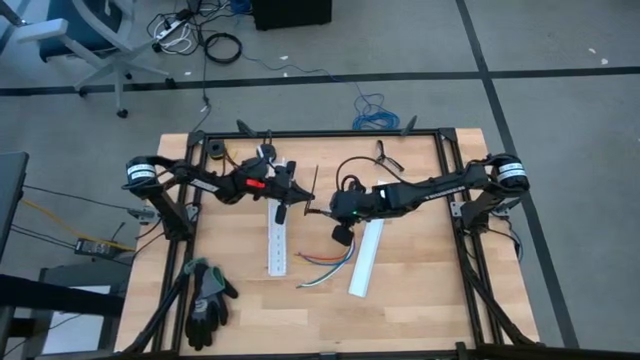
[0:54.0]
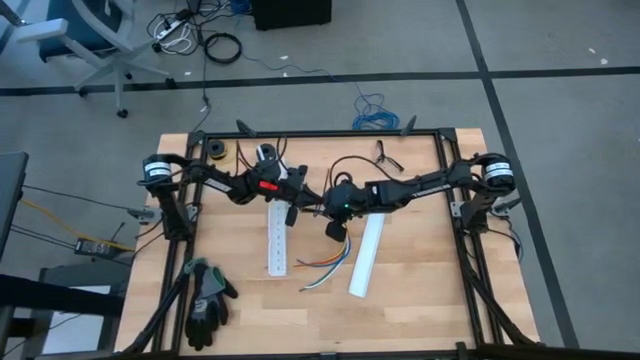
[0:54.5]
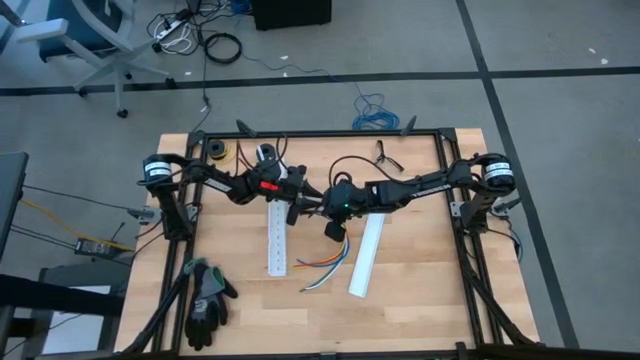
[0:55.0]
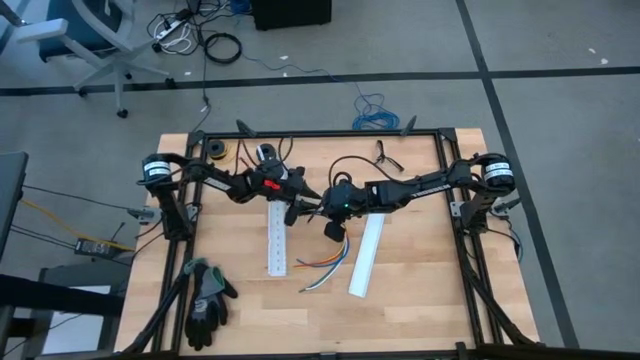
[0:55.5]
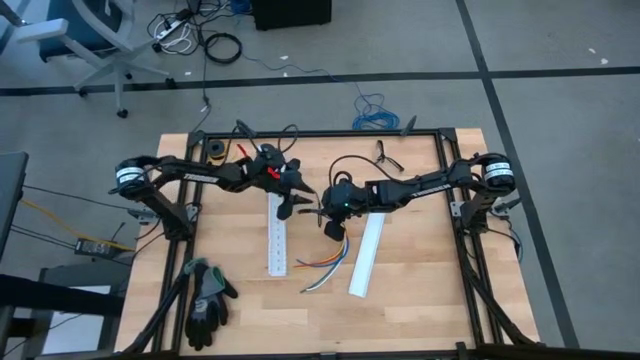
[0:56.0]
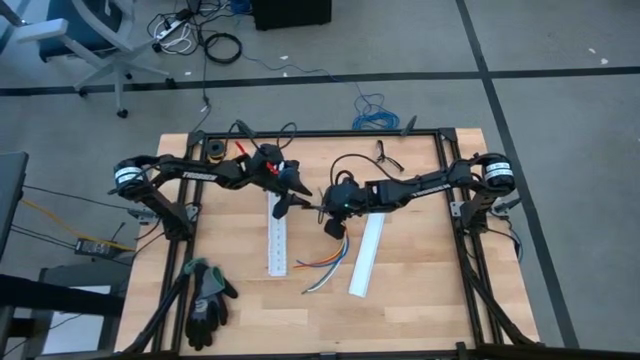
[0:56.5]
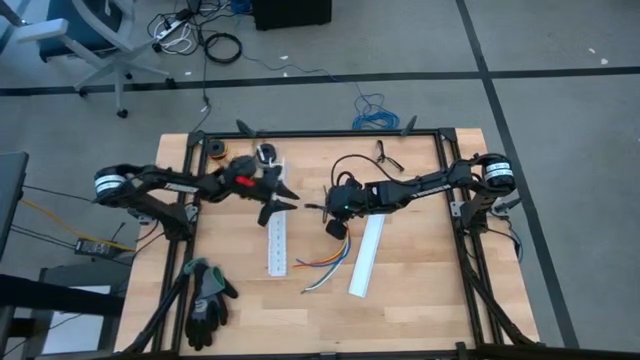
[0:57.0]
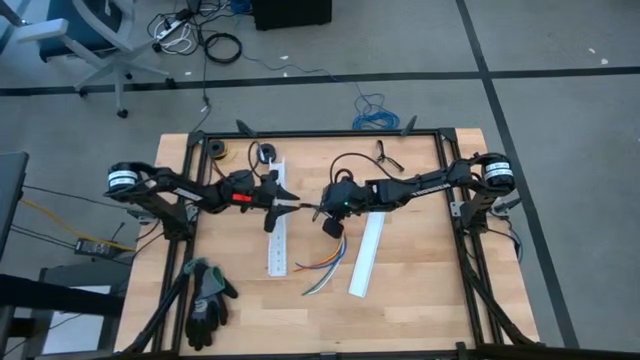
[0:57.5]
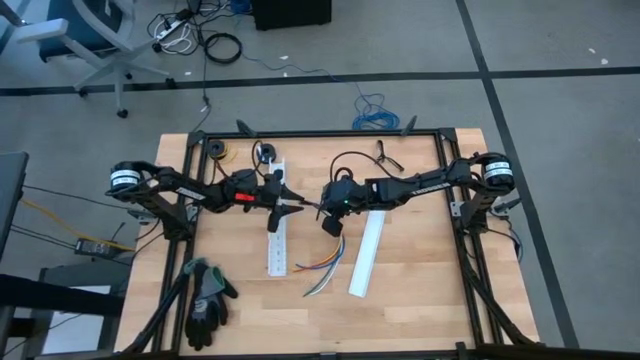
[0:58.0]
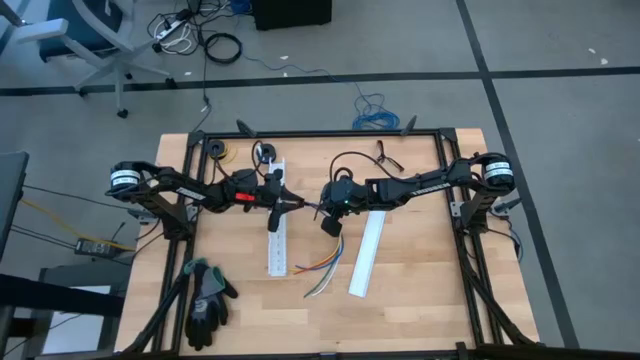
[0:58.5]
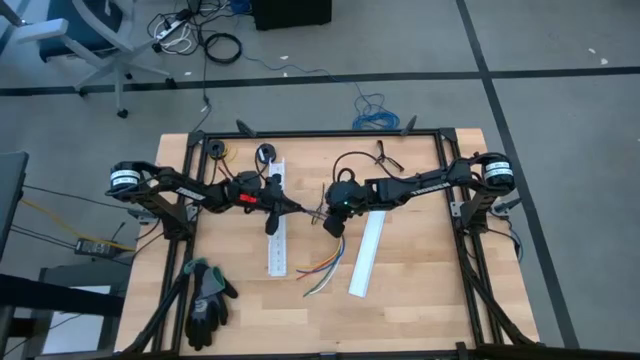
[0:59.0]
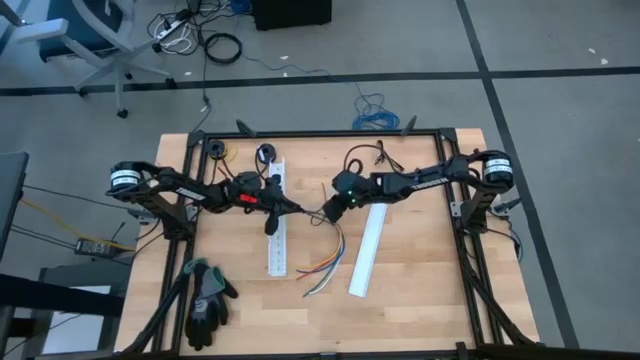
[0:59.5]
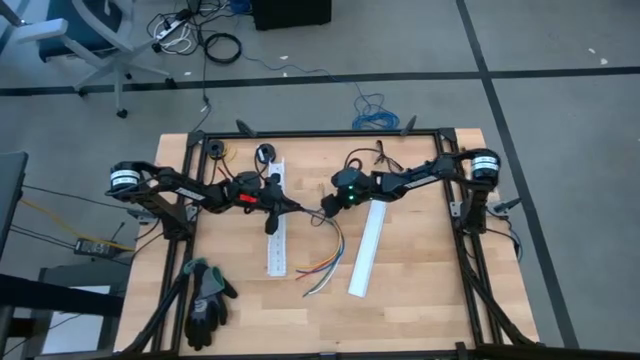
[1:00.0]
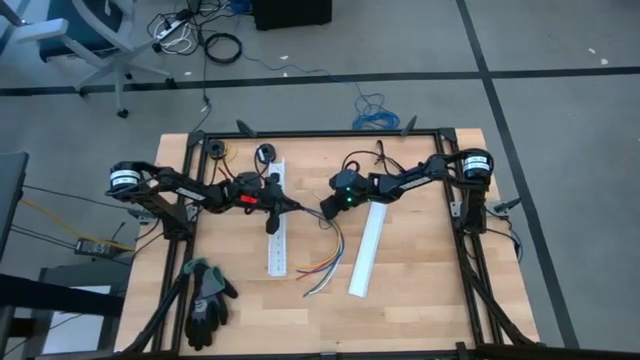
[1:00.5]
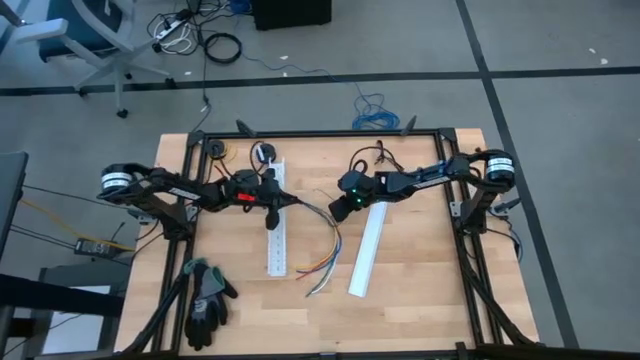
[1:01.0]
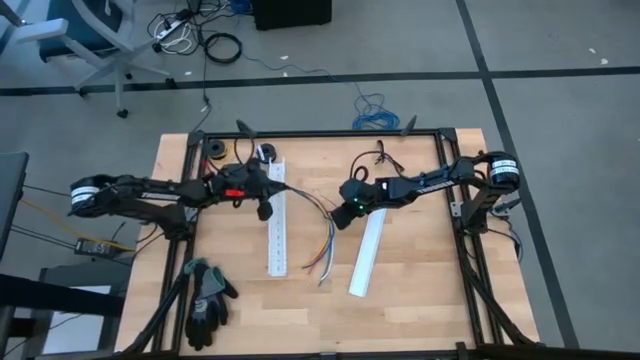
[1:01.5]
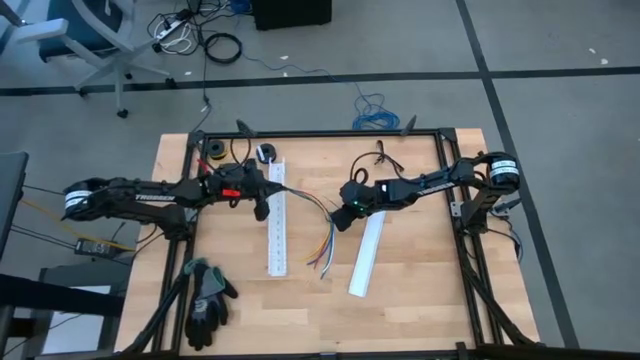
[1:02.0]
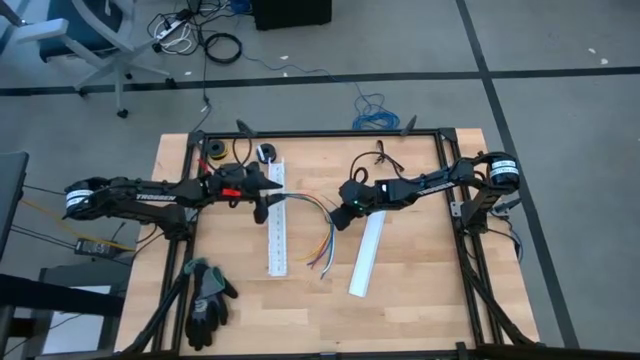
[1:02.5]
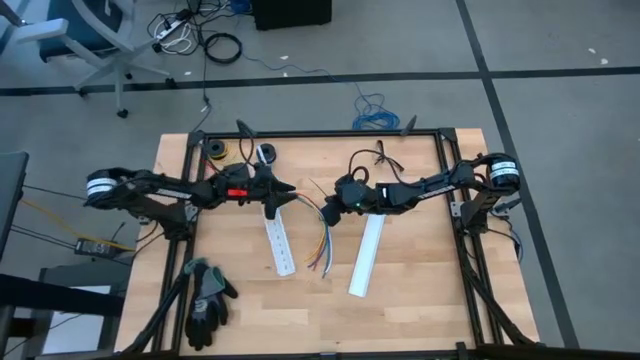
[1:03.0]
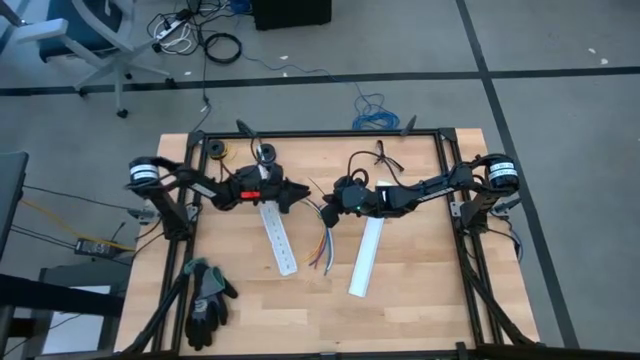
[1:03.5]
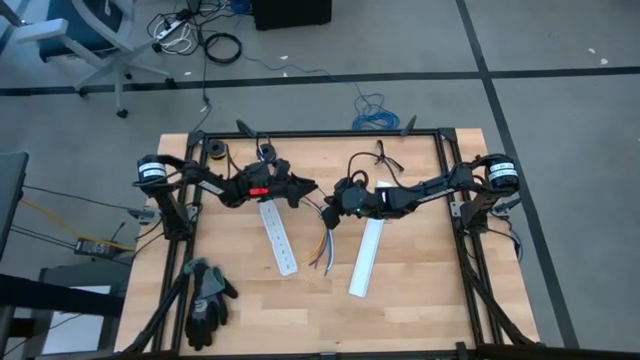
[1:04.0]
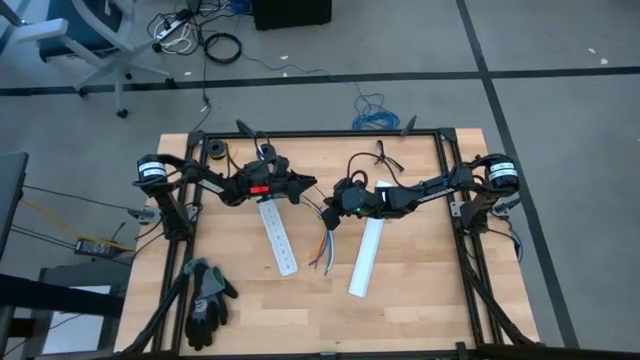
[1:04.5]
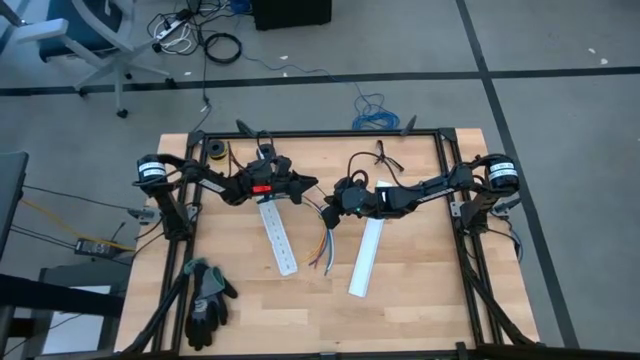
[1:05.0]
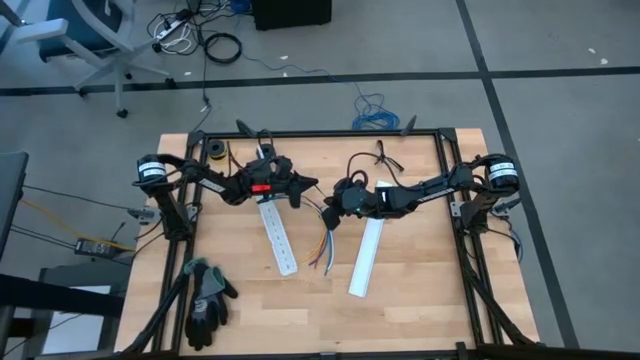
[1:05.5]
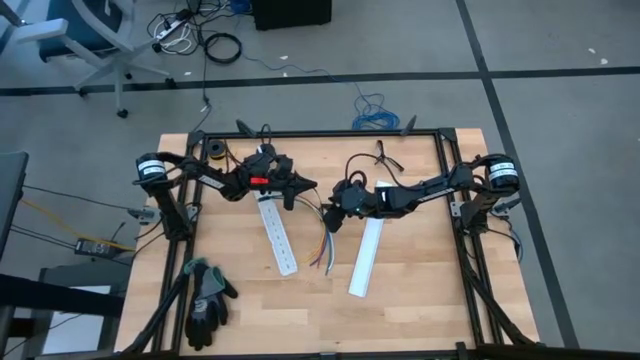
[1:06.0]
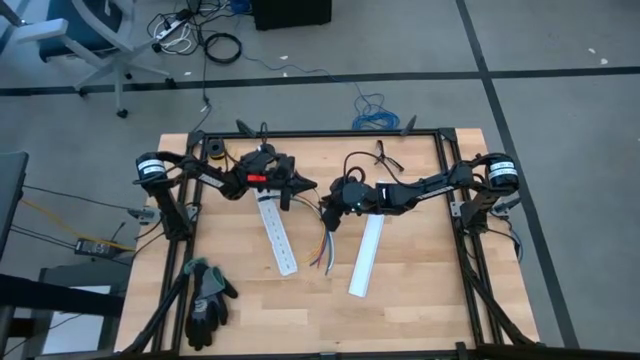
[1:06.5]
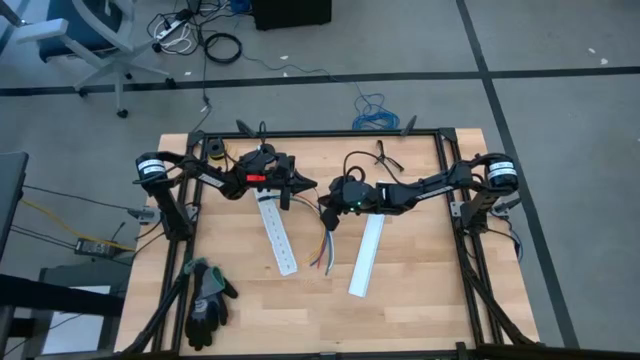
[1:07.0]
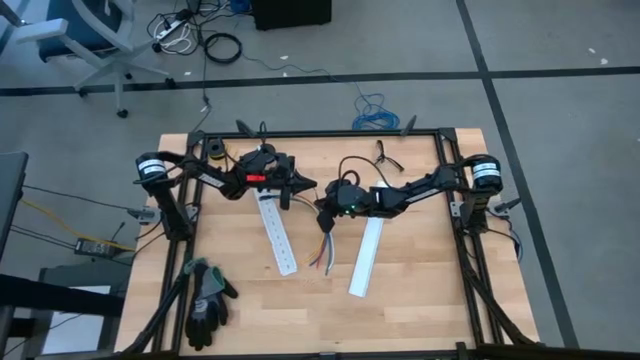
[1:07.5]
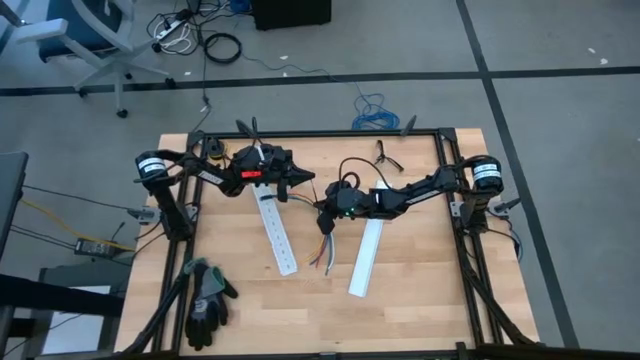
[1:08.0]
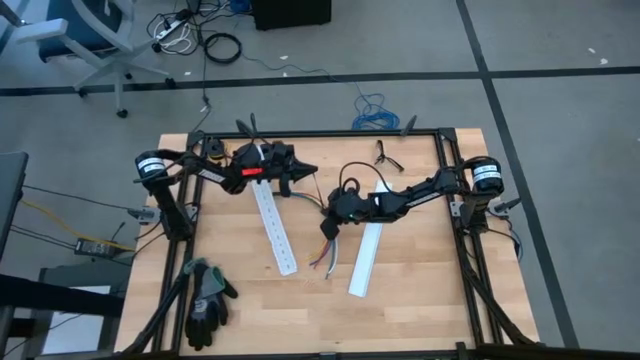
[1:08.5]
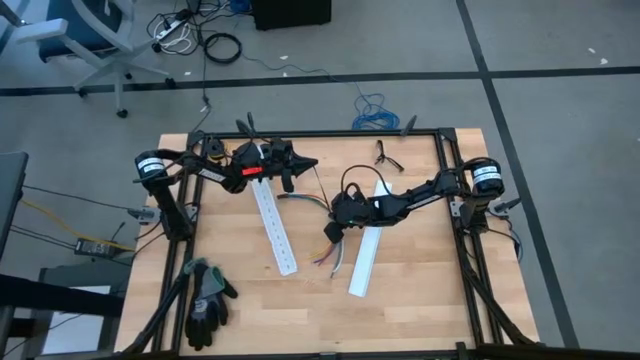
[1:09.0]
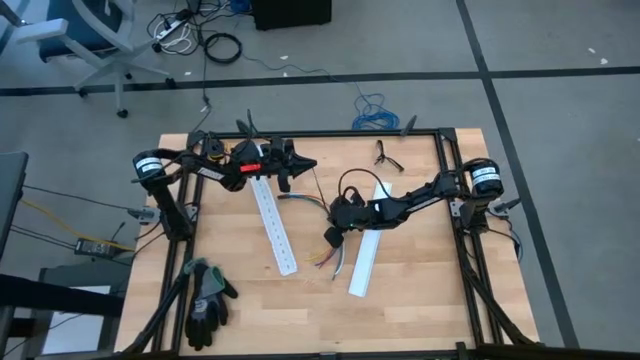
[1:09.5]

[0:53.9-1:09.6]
Task: Ziptie cables
Wrap the zip tie into the cable wires

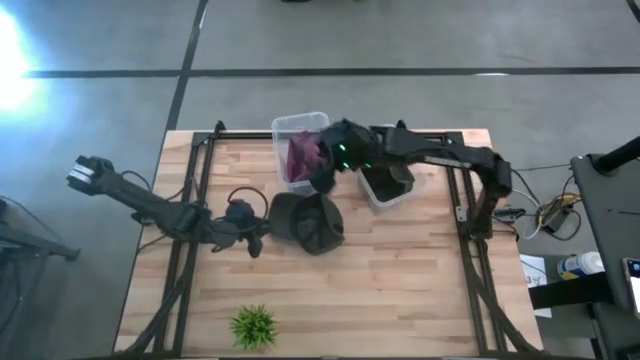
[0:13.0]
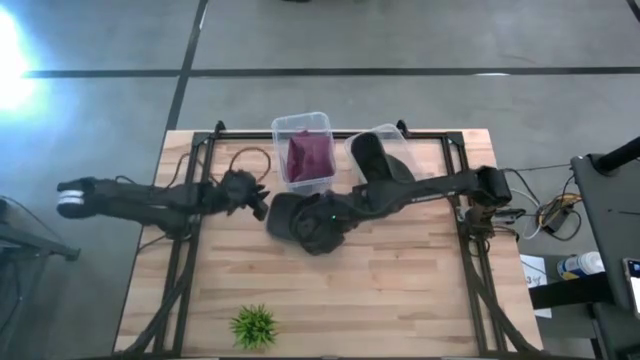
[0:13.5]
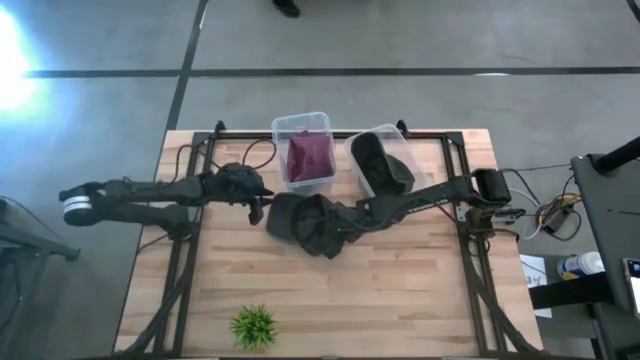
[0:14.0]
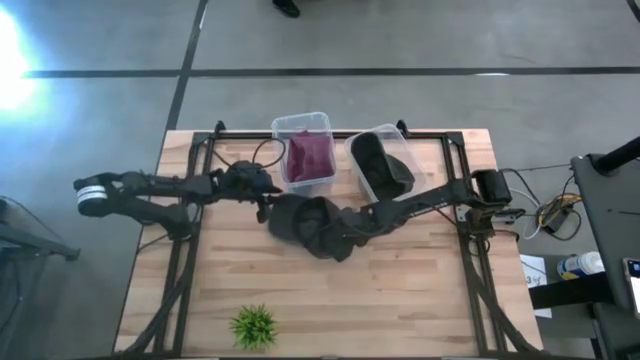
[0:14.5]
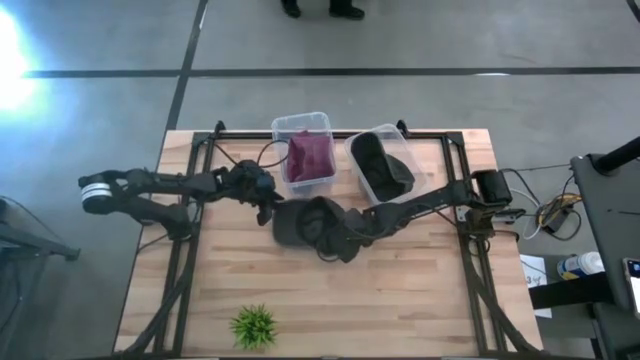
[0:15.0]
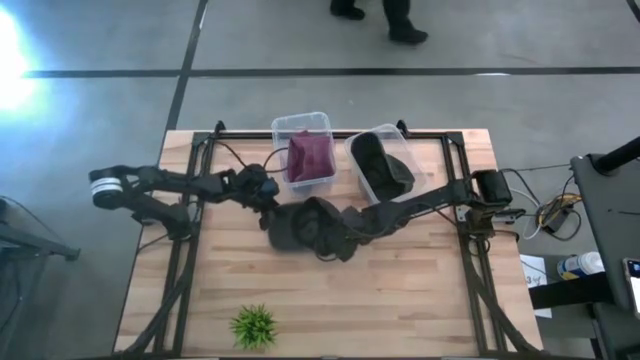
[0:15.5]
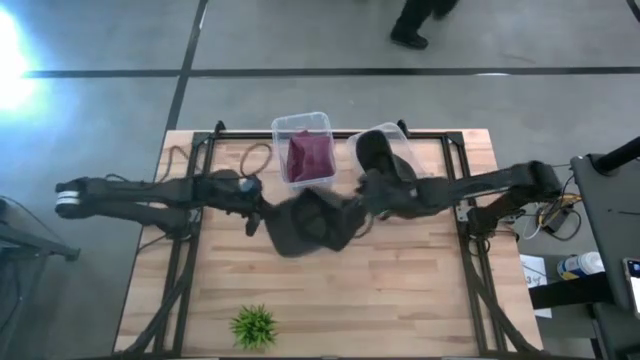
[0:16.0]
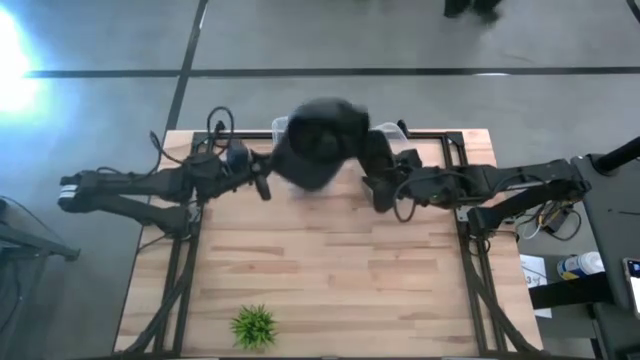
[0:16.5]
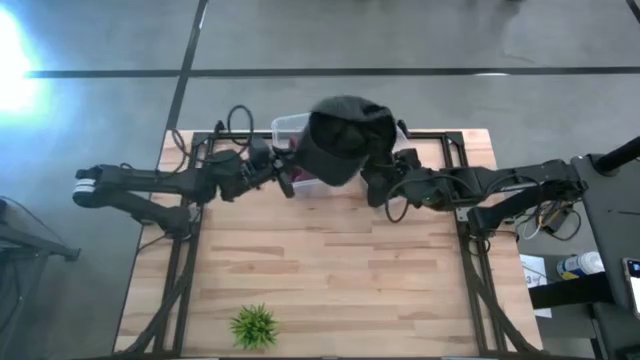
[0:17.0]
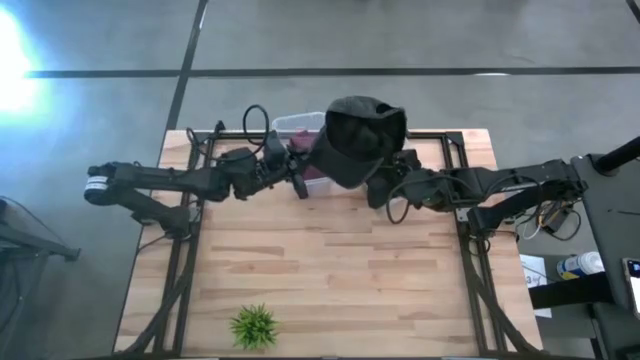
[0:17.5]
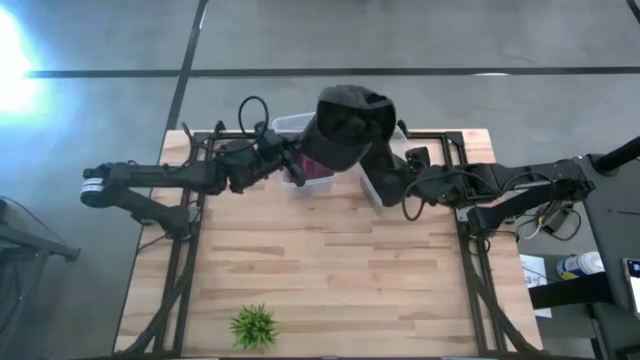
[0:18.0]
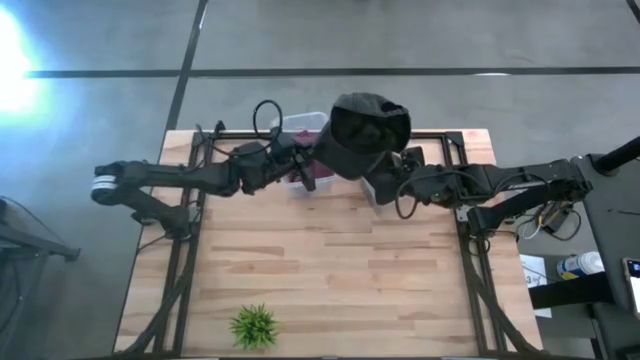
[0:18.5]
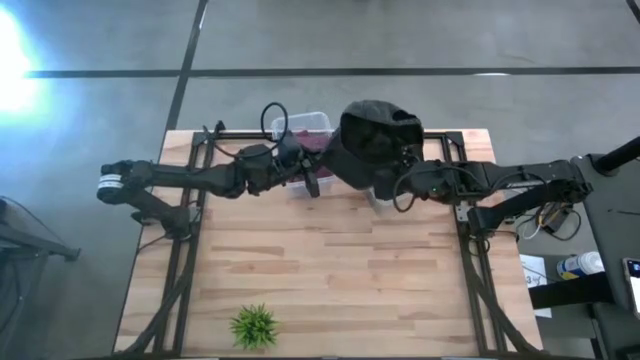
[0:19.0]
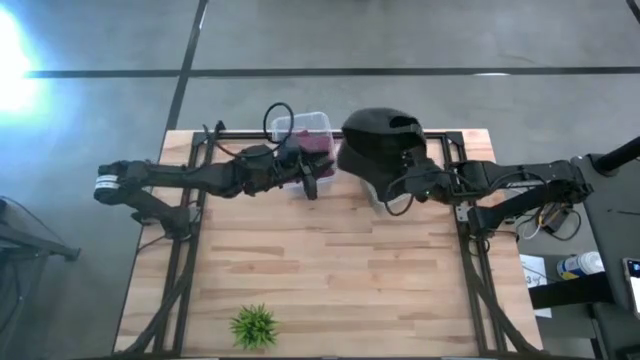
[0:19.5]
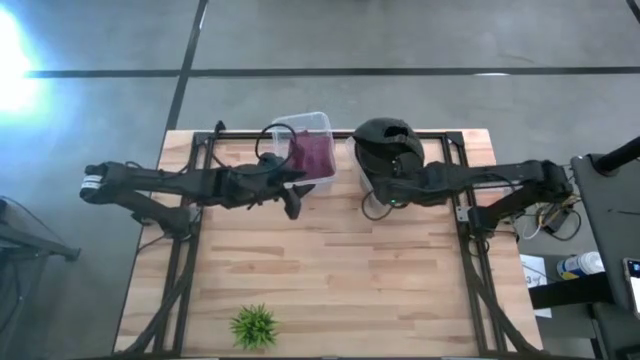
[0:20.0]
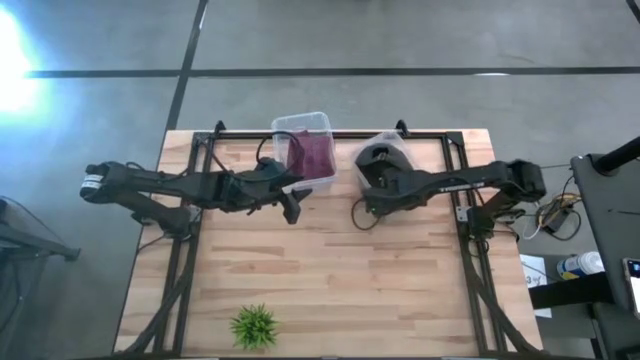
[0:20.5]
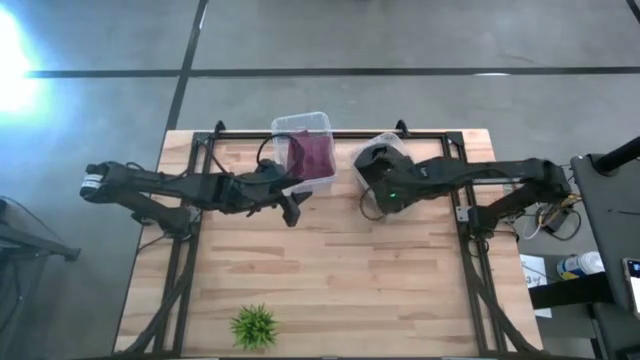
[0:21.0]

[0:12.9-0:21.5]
Task: Pick & Place hat
Put the black cap into the right transparent bin
